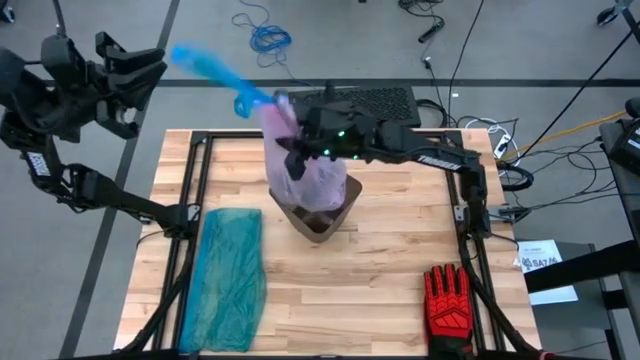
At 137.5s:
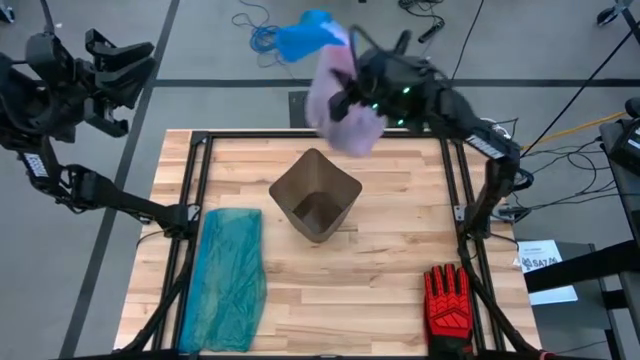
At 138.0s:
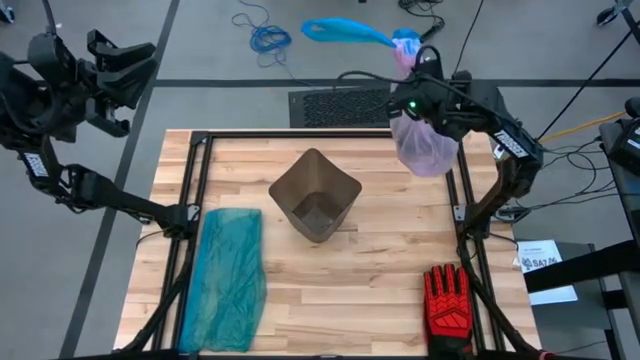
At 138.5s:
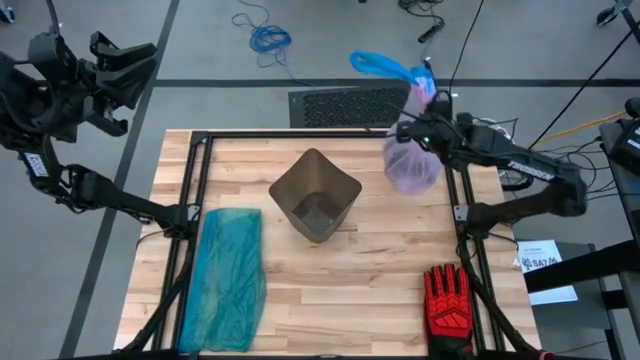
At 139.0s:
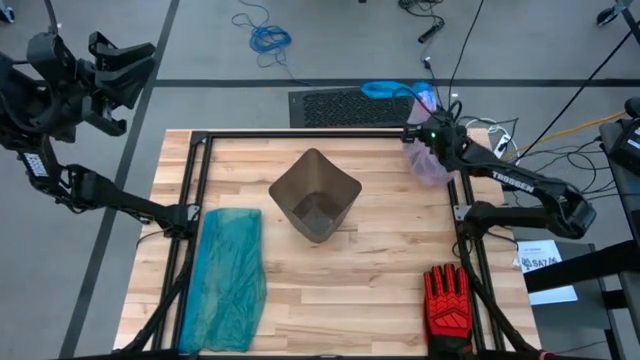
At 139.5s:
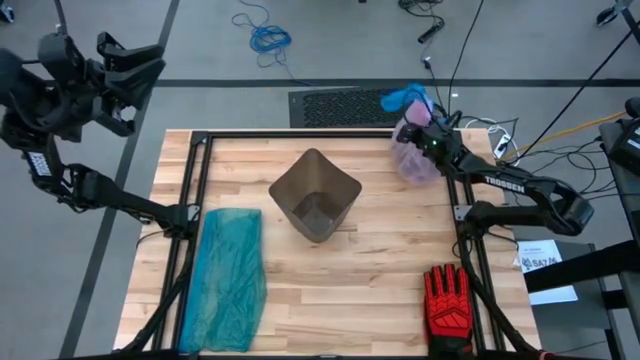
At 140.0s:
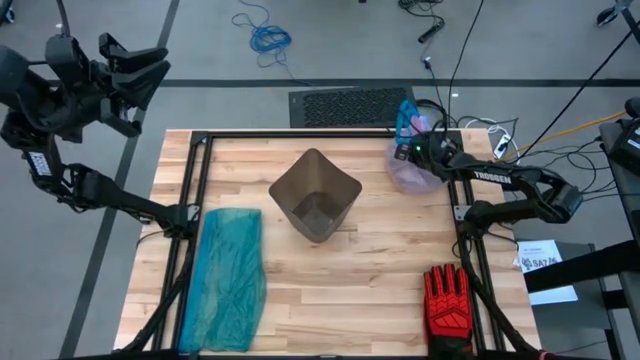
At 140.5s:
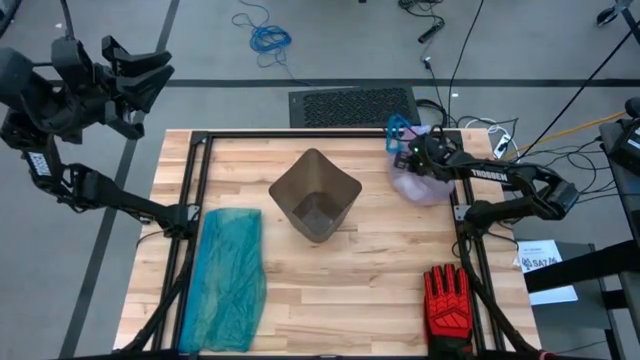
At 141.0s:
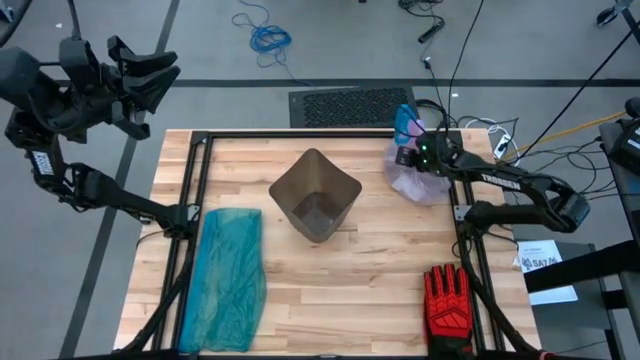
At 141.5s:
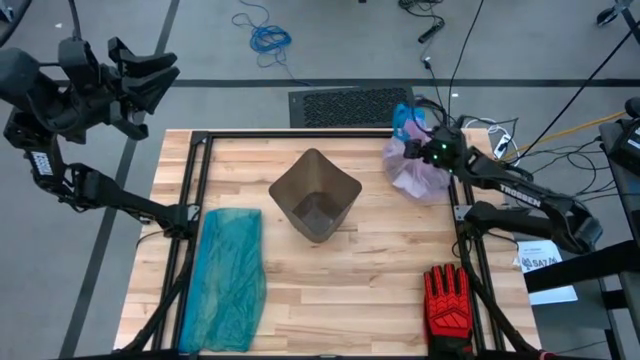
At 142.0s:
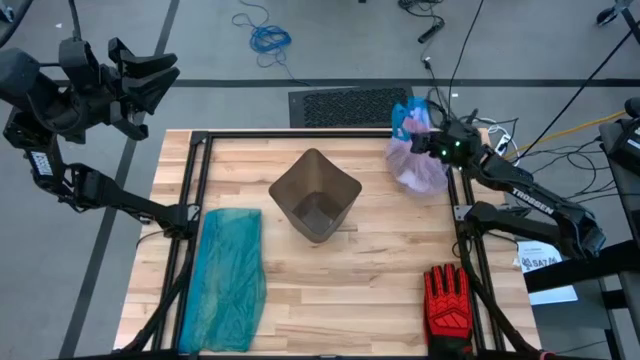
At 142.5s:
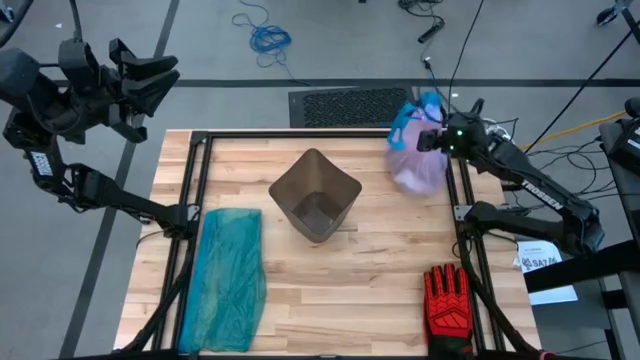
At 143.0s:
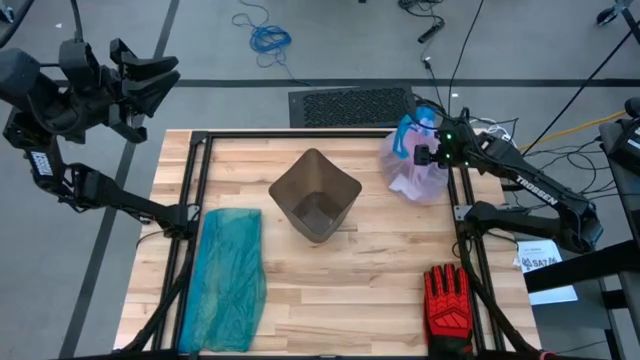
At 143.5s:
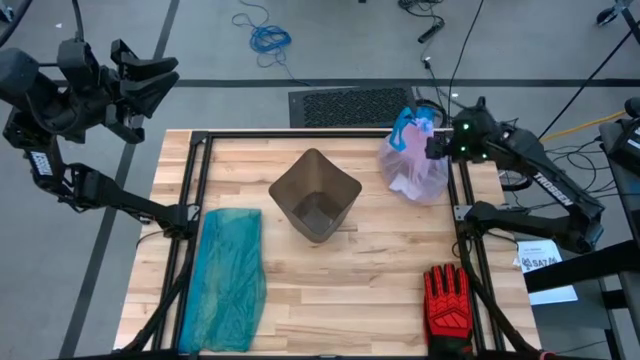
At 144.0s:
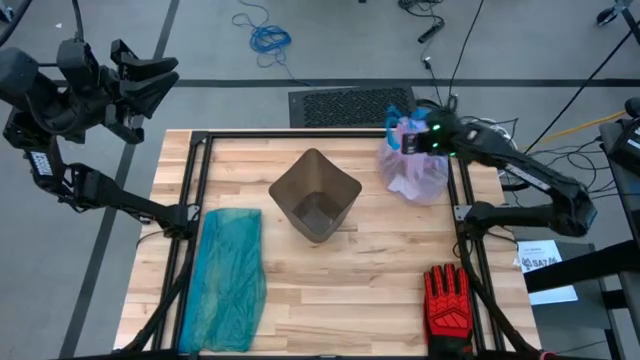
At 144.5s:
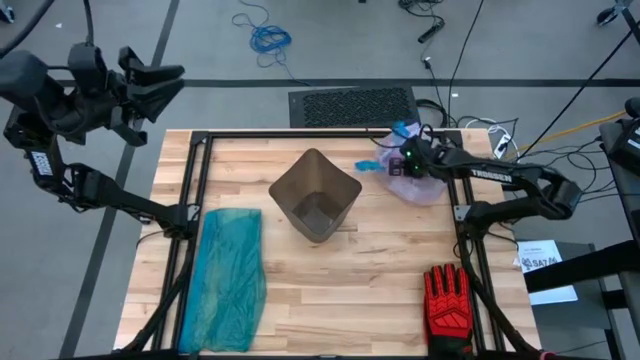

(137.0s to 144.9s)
Task: place trash/remove bag and relplace
Remove the trash bag from the trash bin

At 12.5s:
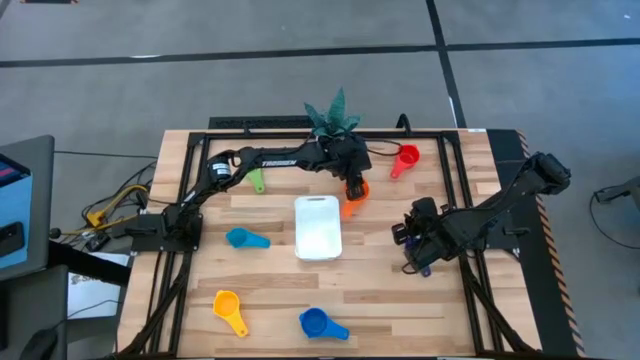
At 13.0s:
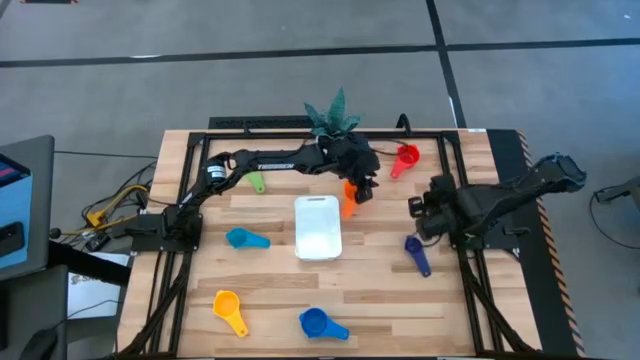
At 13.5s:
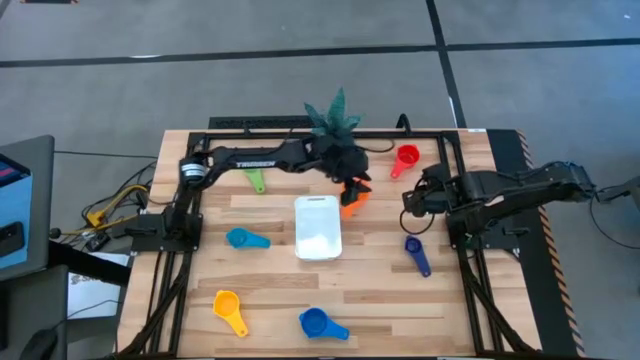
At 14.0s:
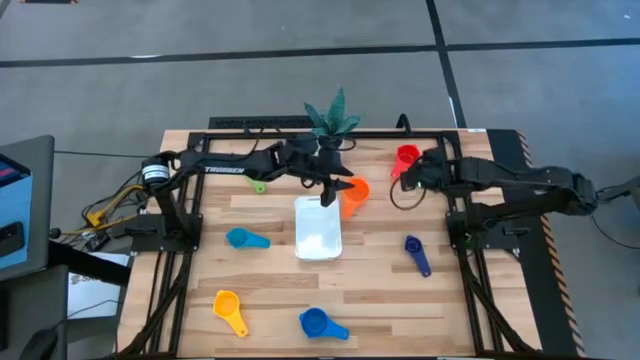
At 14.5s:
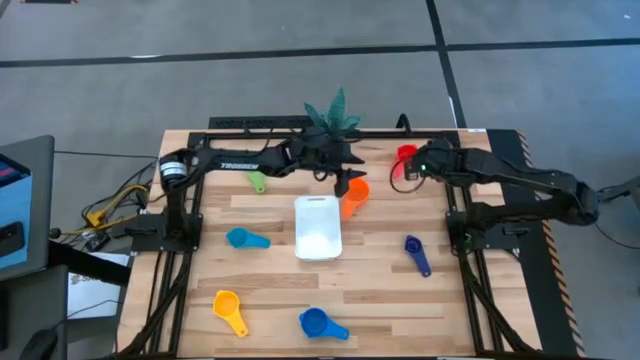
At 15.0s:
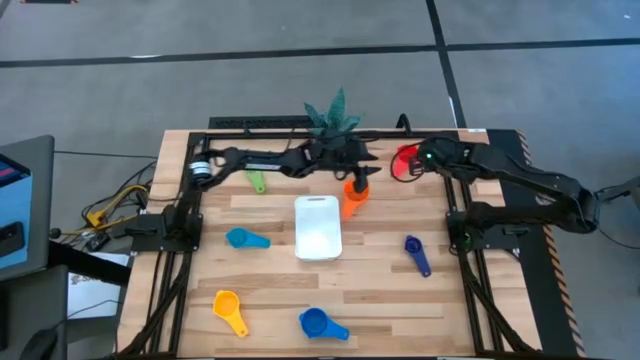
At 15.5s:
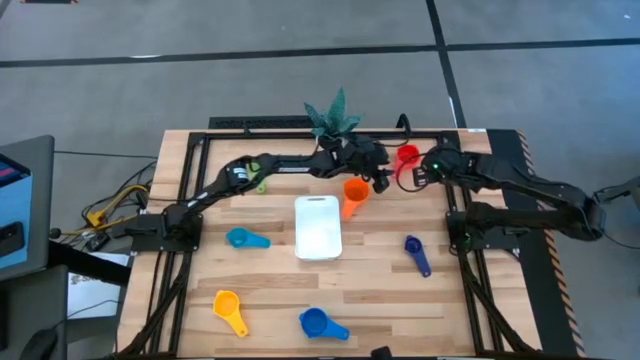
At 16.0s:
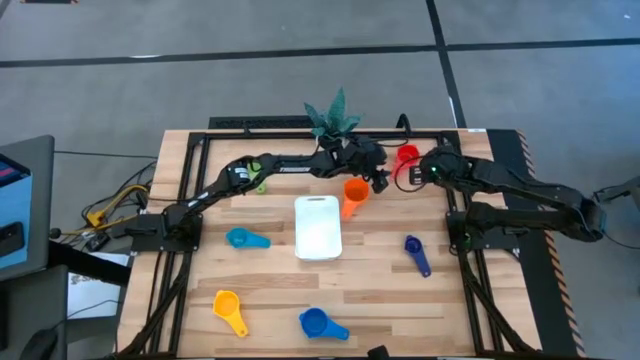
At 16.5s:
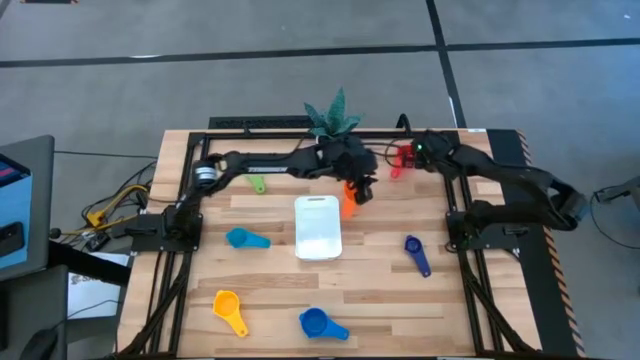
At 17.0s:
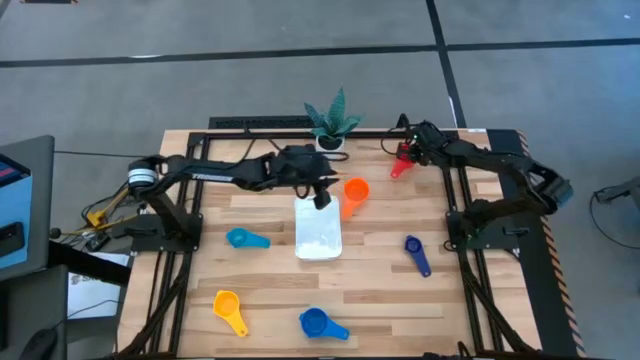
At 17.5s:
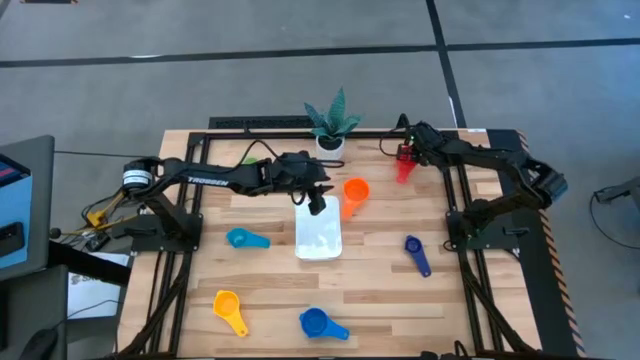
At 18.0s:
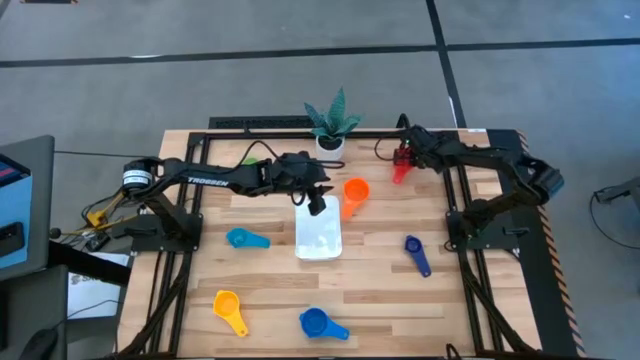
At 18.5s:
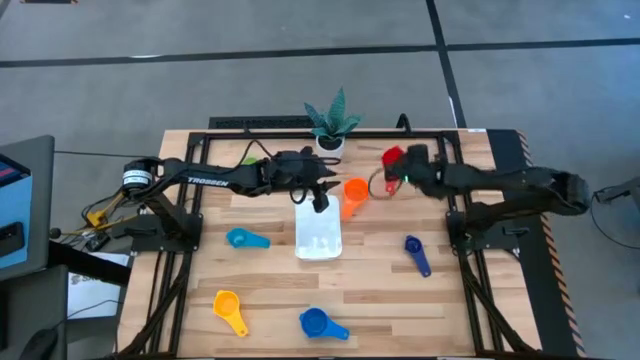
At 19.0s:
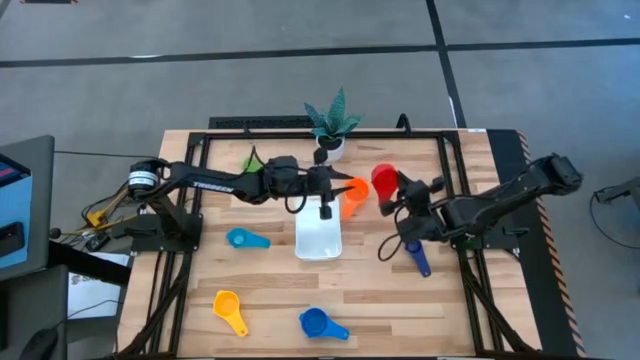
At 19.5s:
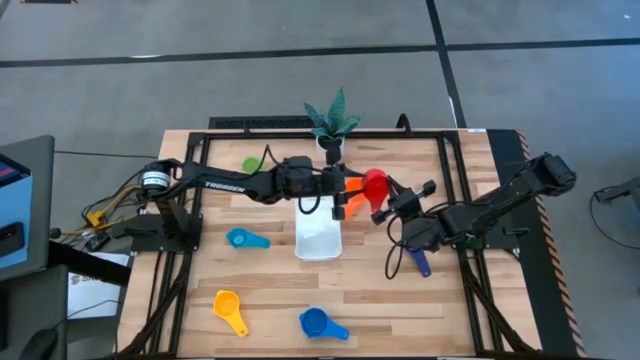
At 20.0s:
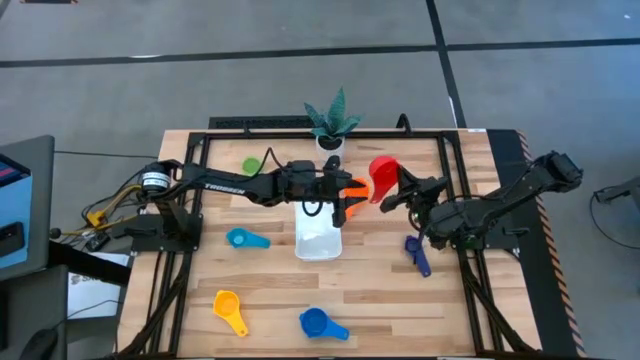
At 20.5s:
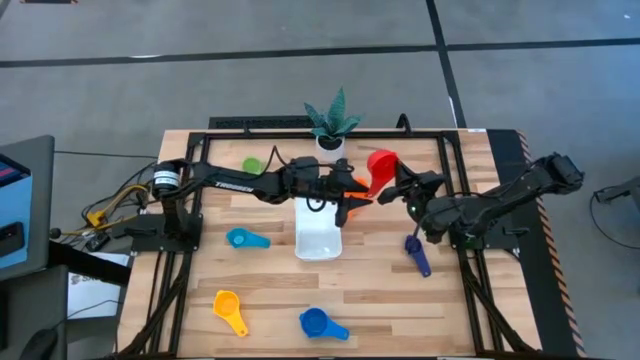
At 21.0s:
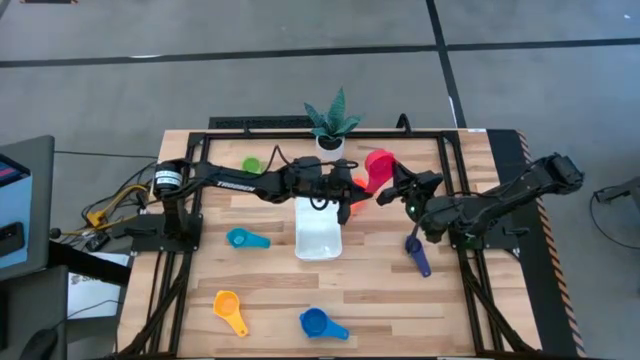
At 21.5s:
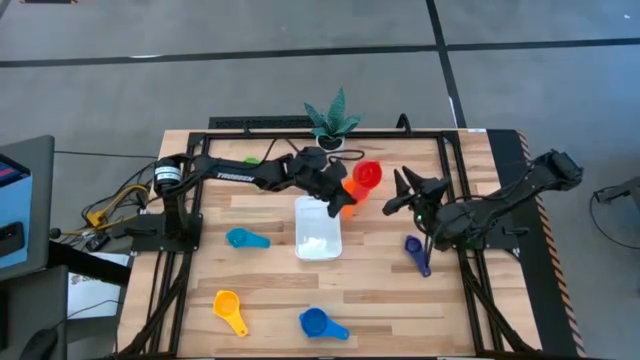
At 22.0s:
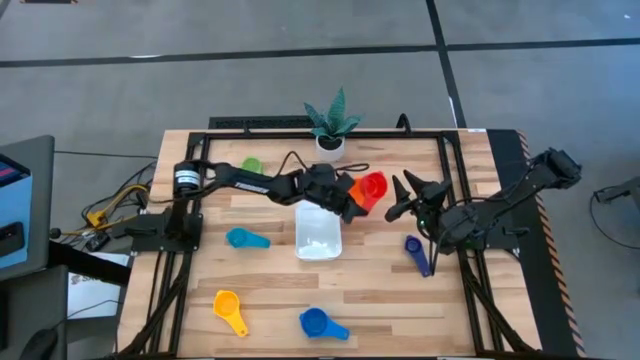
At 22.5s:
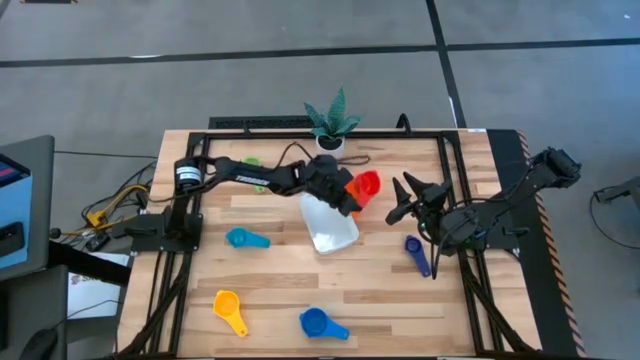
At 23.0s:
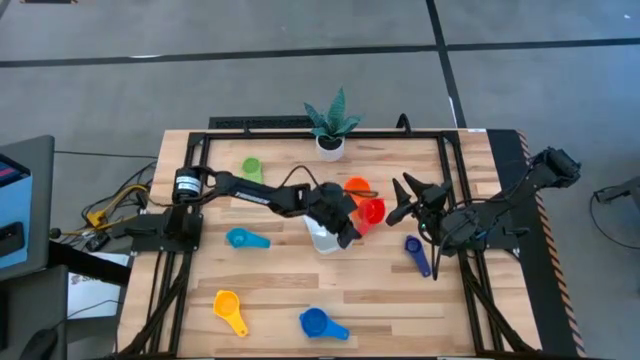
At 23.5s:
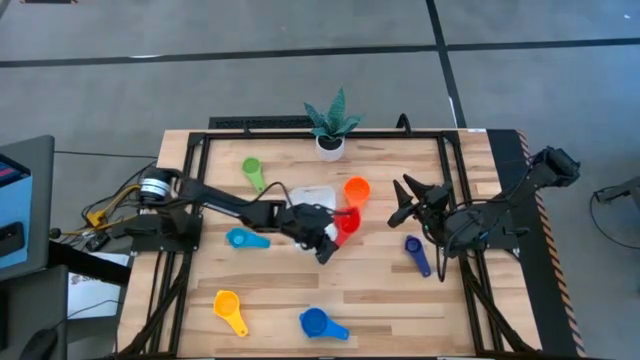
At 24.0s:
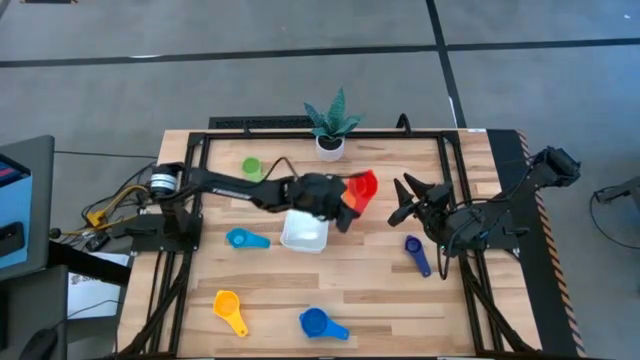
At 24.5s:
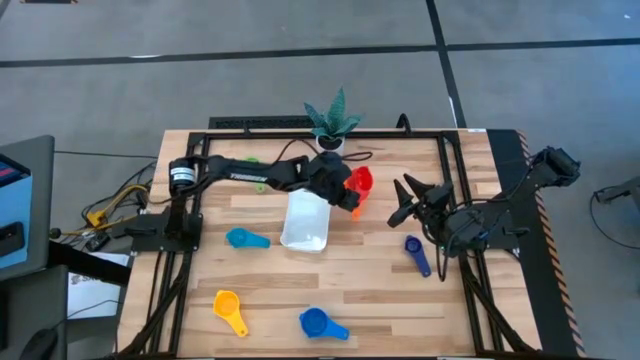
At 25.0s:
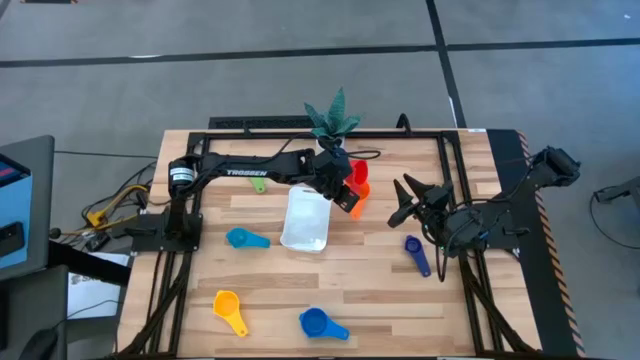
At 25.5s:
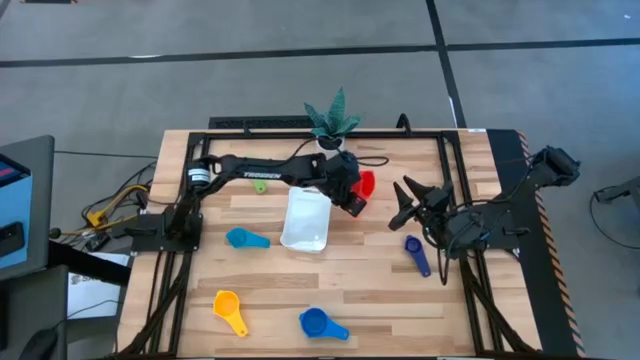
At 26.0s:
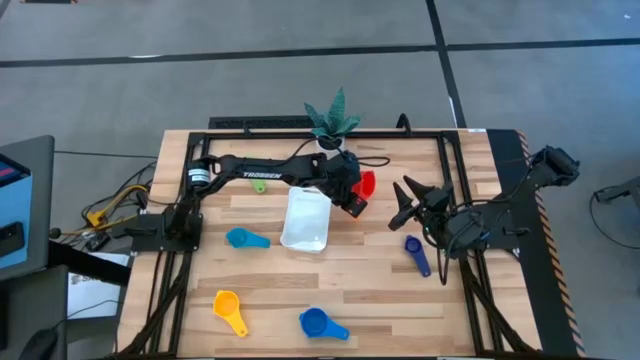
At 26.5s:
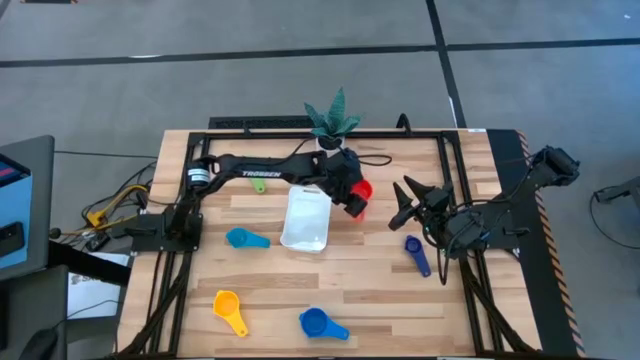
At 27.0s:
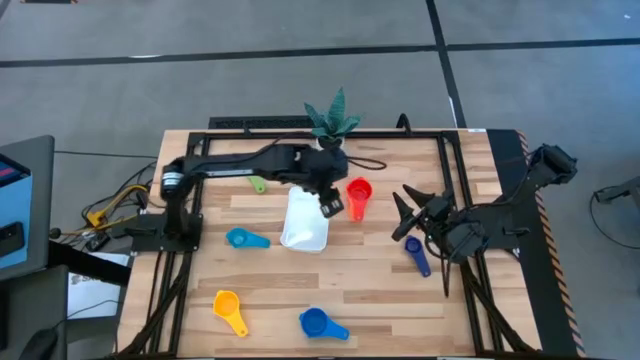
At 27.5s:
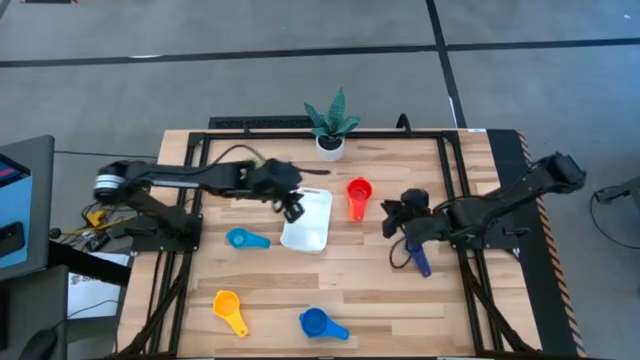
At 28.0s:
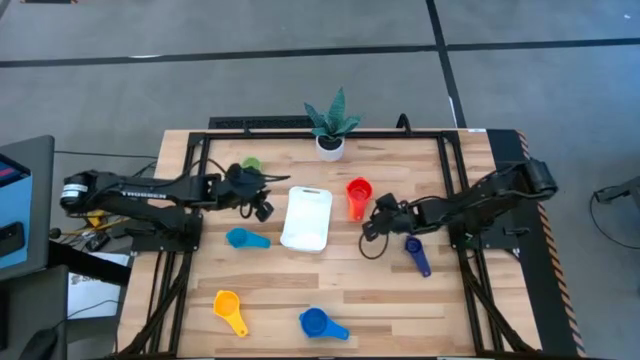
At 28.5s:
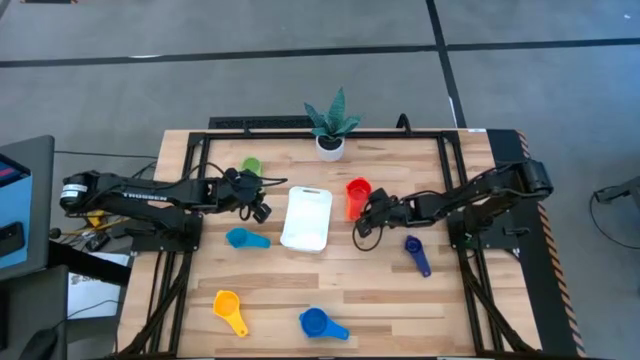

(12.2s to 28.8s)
Task: Nest measuring cups in basket
Stack the red measuring cup on top of the the orange measuring cup
